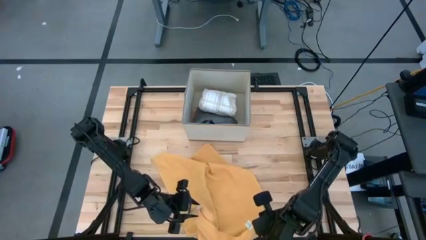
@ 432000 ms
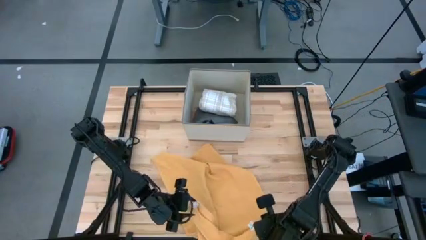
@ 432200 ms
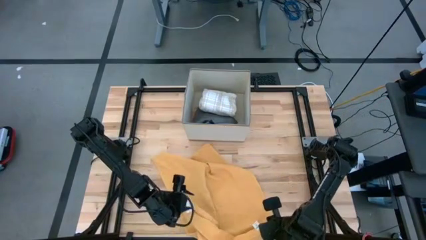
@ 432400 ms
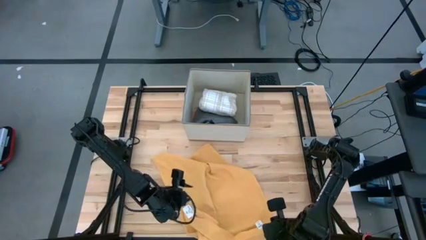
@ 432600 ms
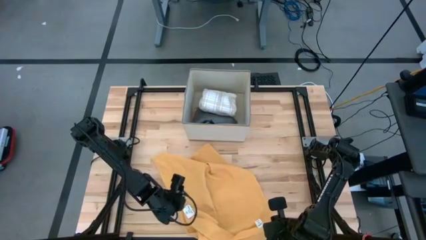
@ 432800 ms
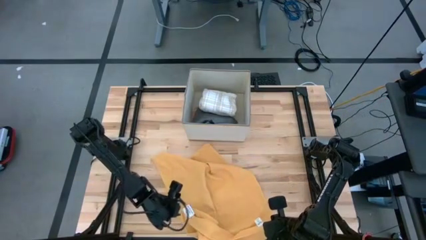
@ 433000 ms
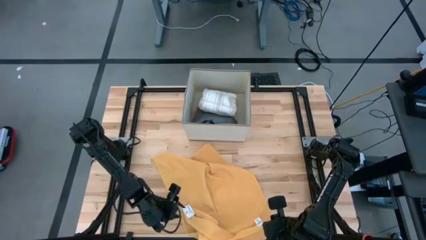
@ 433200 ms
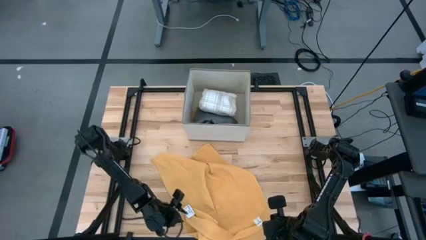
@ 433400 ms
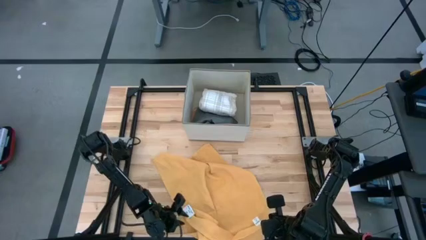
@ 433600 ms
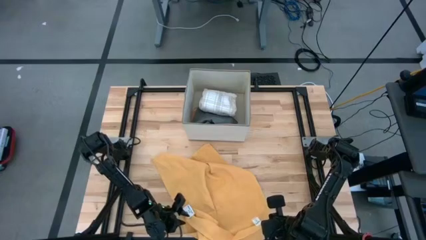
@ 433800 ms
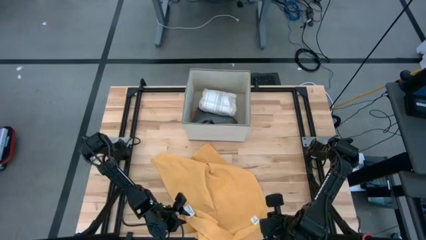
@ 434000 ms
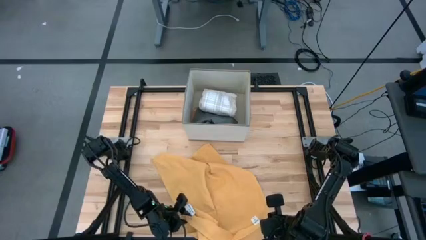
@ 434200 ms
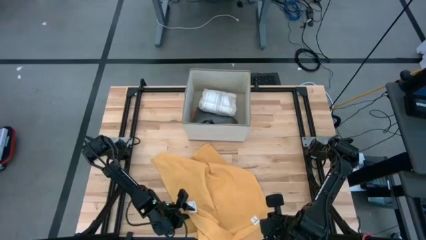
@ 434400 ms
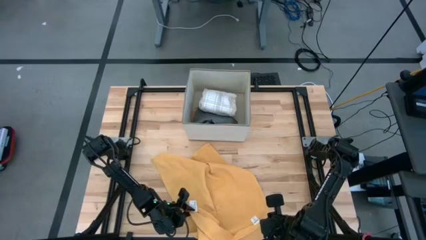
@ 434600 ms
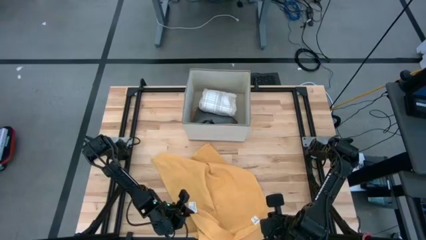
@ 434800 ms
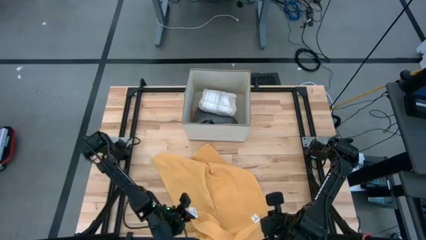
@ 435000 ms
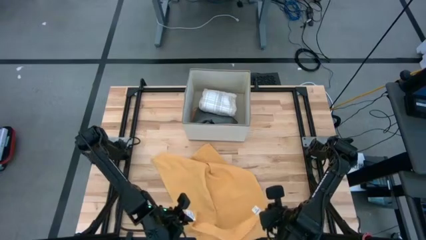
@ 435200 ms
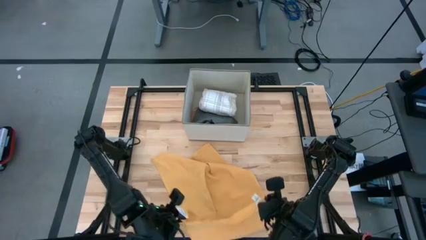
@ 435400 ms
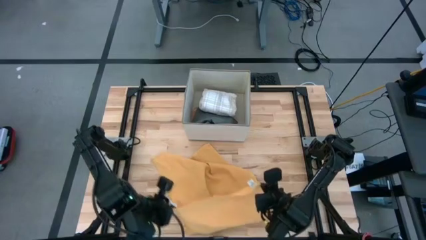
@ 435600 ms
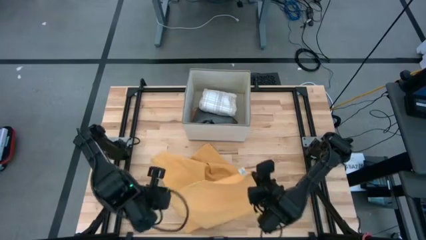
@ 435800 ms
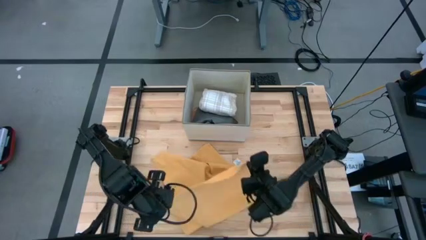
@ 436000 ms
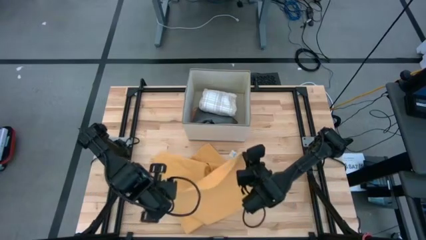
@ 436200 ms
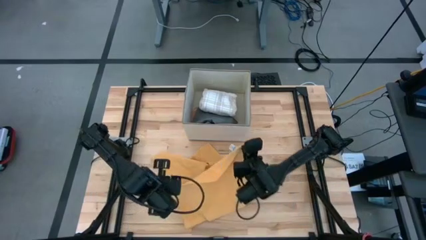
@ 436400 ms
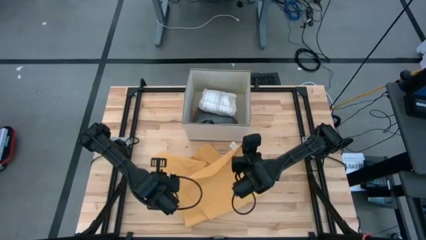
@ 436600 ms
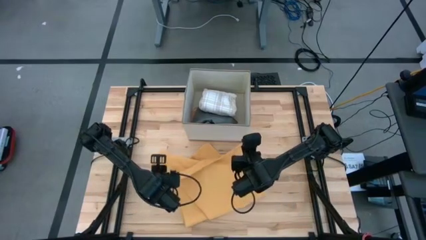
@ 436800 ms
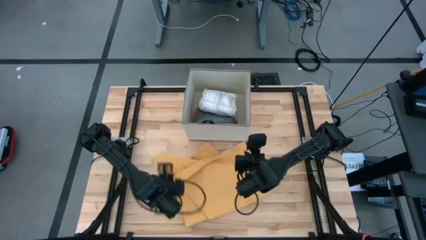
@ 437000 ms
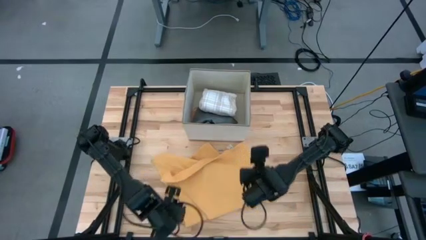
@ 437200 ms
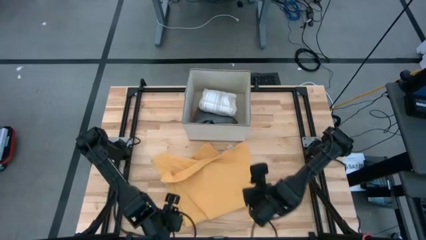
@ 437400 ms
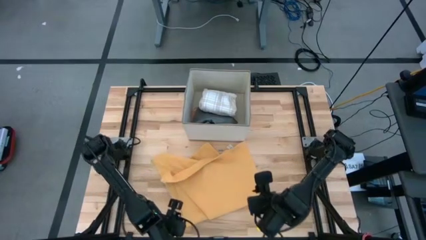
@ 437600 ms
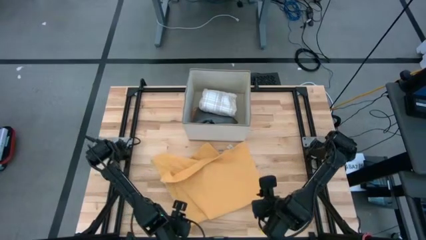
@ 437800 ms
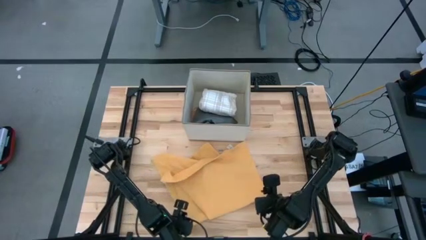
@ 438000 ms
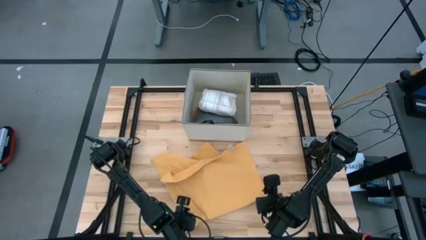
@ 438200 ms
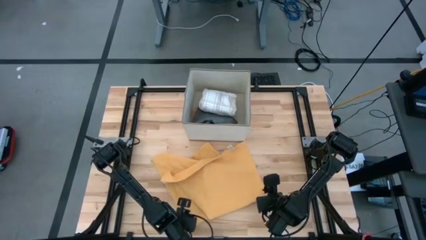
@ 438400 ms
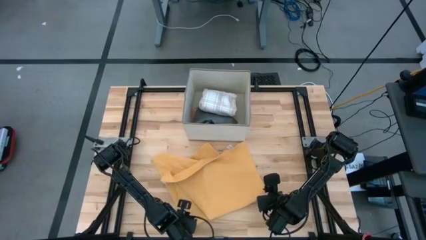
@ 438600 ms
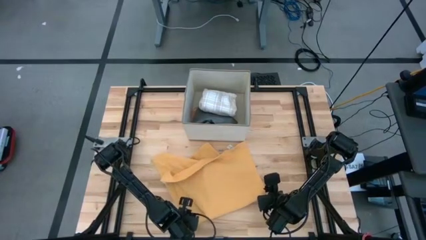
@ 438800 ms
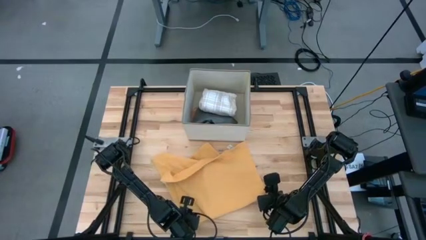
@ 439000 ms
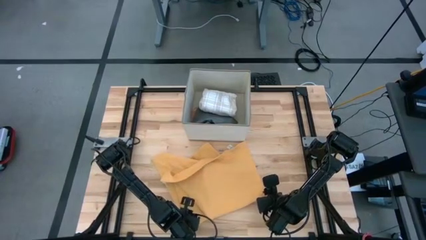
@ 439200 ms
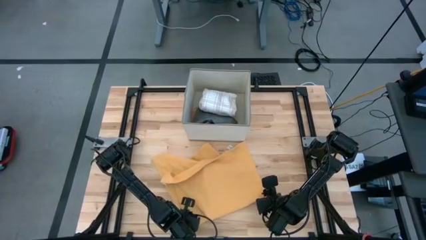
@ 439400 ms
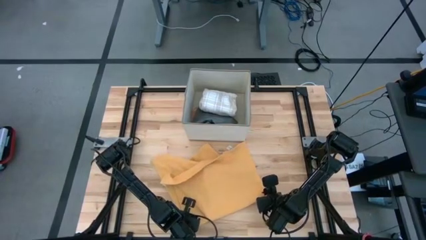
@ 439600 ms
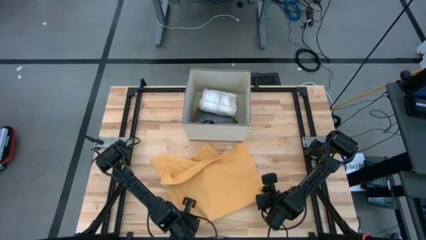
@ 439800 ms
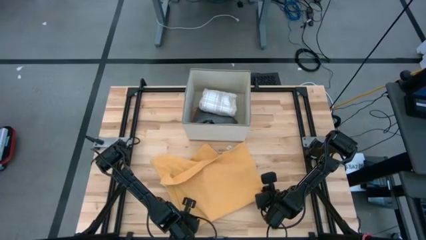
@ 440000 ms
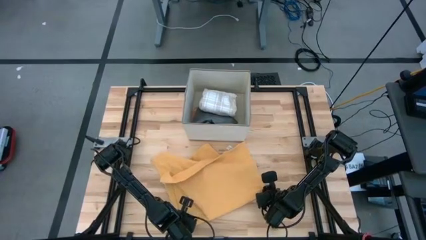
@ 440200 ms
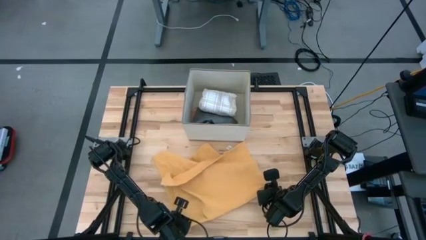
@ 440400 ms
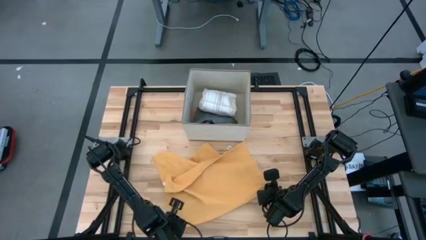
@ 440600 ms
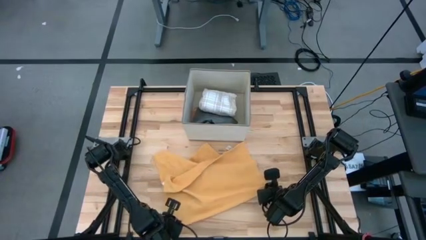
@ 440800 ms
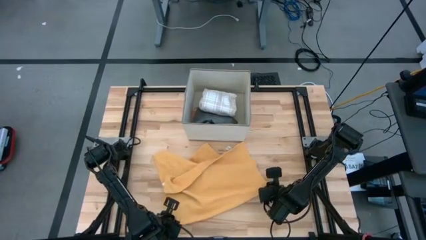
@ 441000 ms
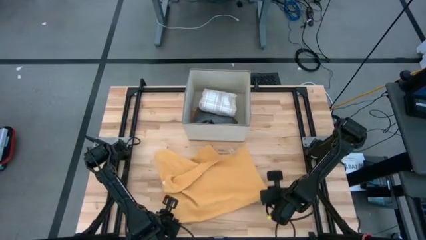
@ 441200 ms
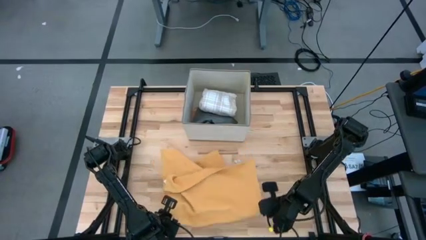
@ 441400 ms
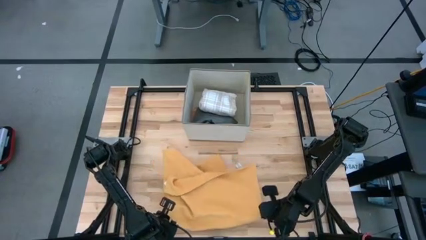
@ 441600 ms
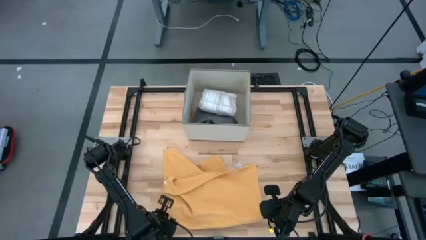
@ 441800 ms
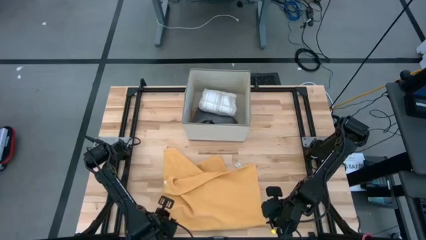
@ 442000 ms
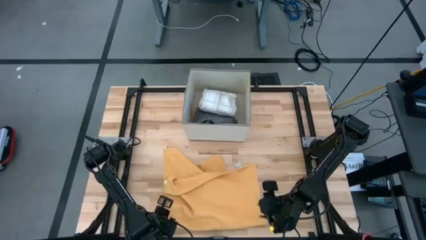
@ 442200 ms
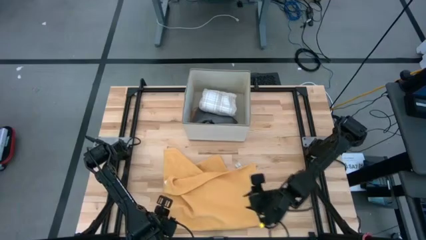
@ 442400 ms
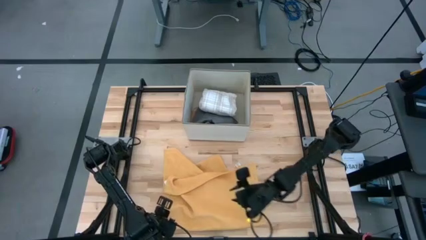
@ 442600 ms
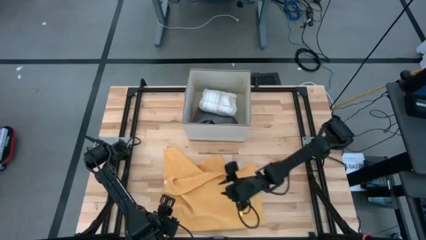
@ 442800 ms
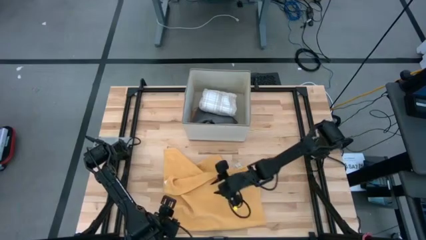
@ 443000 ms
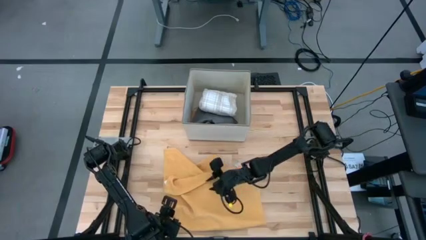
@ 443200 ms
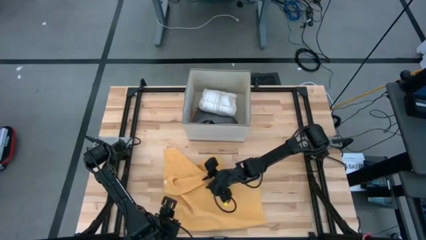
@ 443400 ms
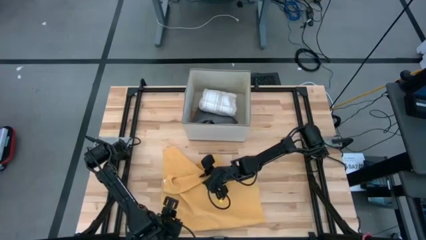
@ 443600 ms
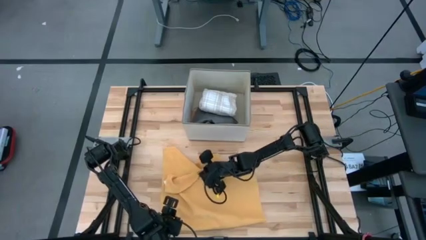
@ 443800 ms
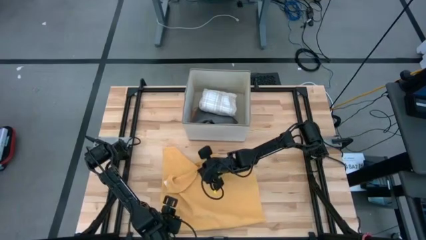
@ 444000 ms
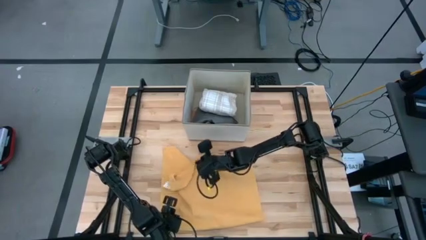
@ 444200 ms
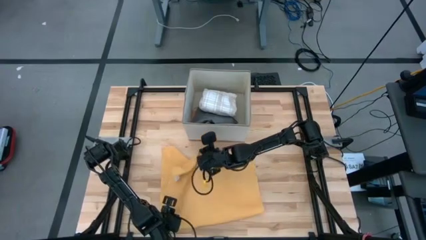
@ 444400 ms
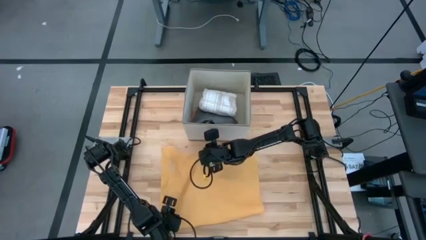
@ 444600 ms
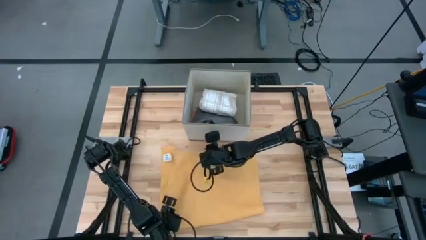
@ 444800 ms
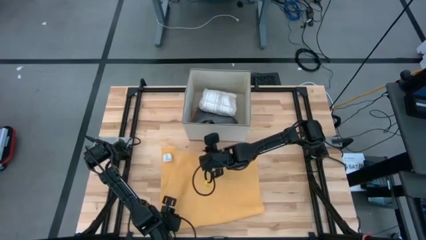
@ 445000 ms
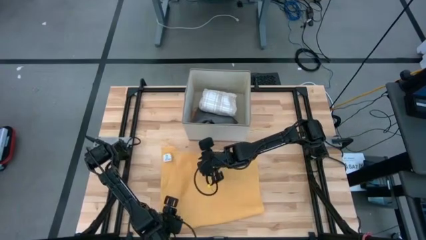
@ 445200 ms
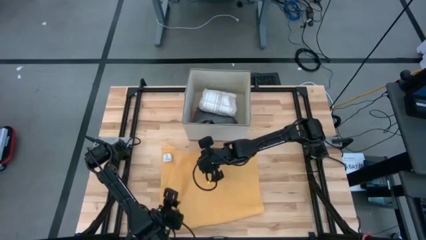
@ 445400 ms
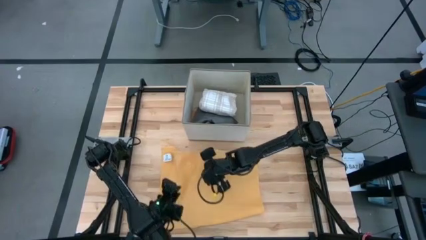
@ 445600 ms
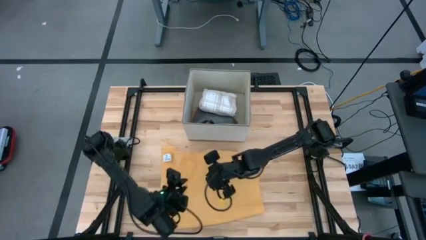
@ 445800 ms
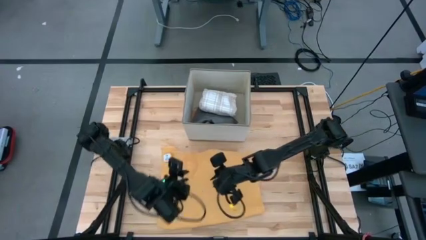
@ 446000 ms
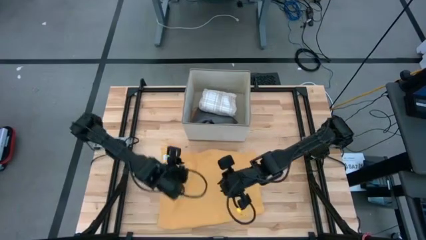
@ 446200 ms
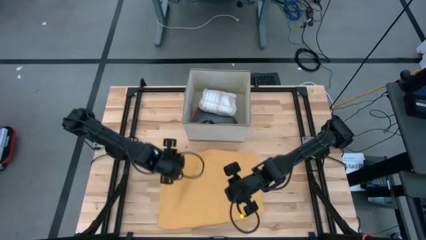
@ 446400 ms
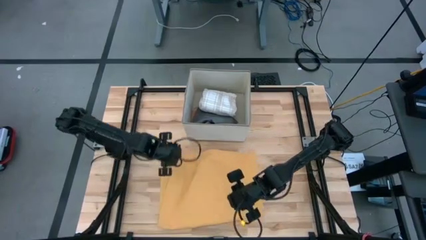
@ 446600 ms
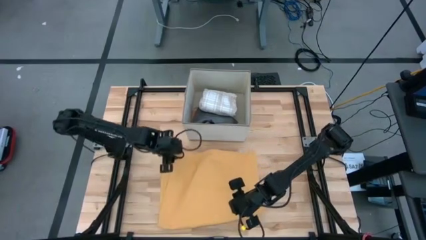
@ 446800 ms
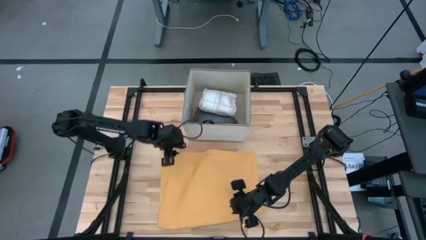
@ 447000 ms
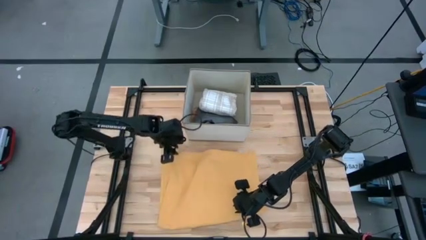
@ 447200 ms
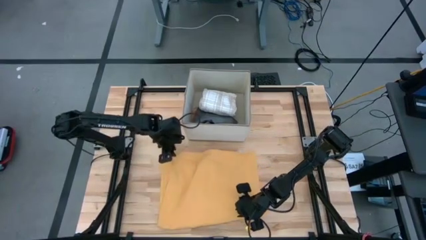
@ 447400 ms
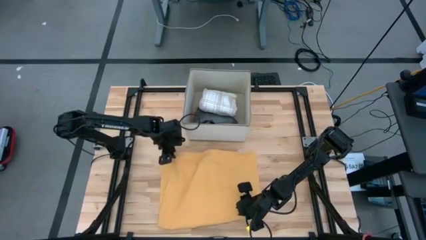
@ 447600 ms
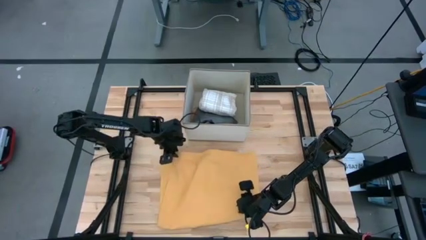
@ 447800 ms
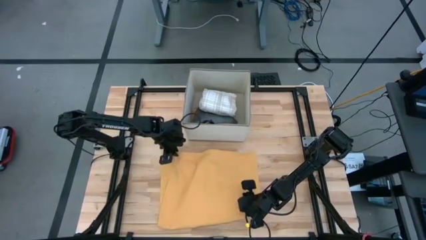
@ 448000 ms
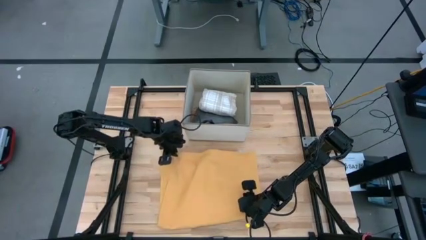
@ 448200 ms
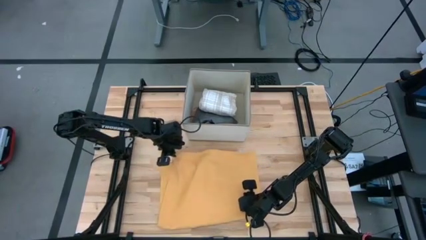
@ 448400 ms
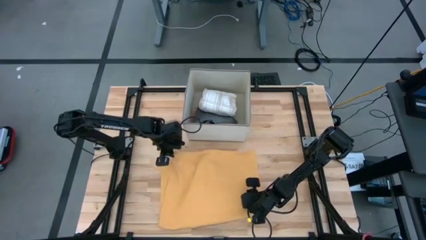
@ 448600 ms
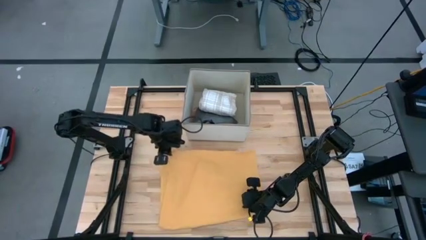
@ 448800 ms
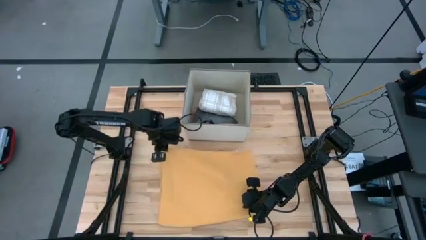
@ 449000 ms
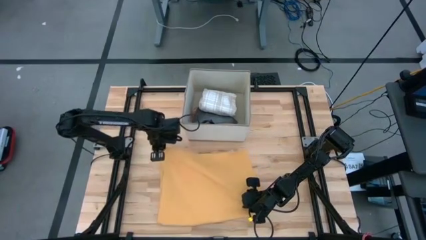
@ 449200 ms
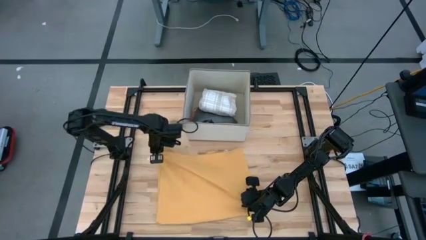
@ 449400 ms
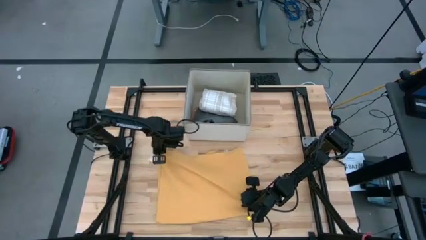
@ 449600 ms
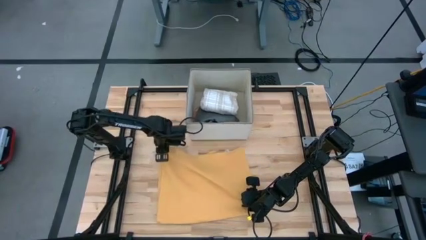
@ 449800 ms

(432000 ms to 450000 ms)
Task: Fold towel
Fold the orange towel
